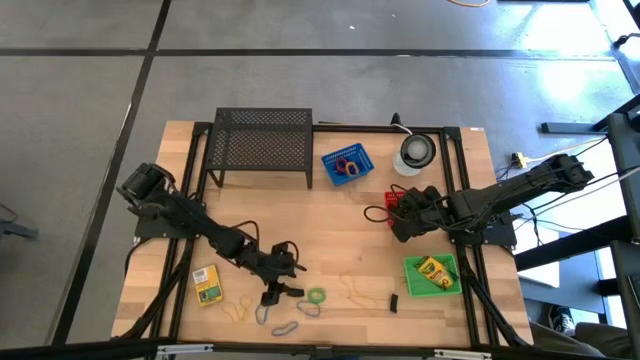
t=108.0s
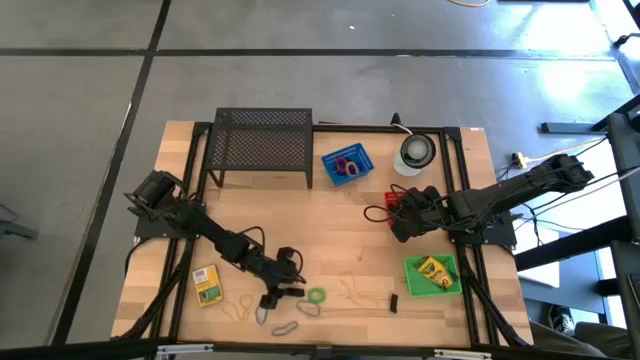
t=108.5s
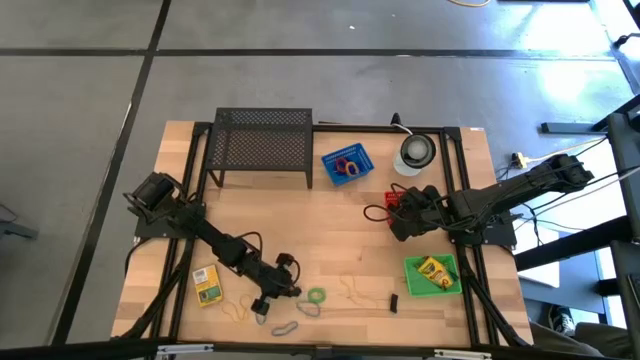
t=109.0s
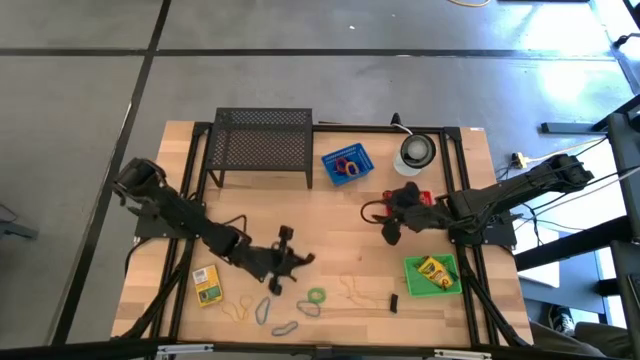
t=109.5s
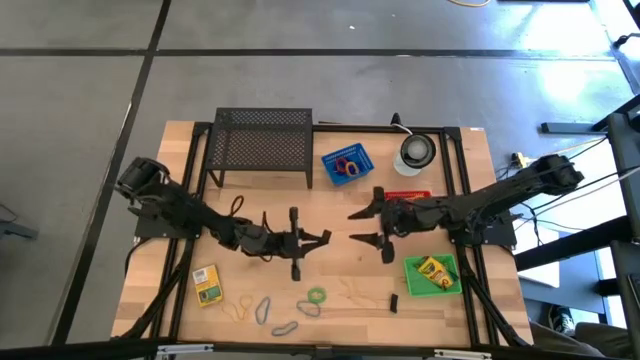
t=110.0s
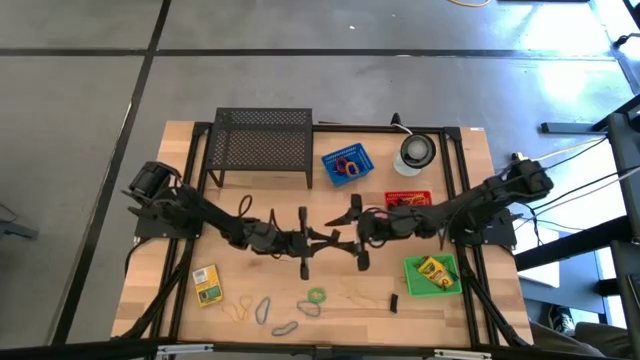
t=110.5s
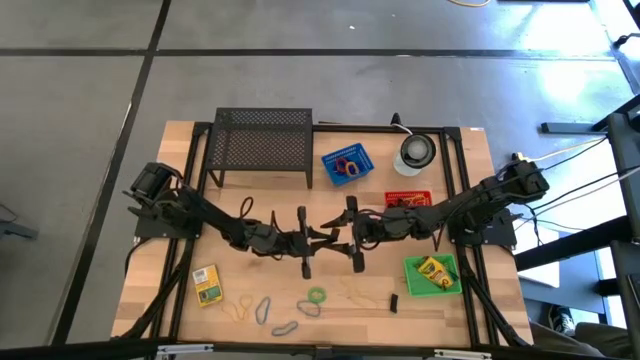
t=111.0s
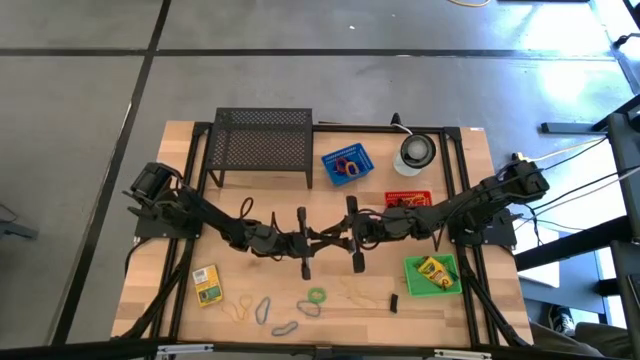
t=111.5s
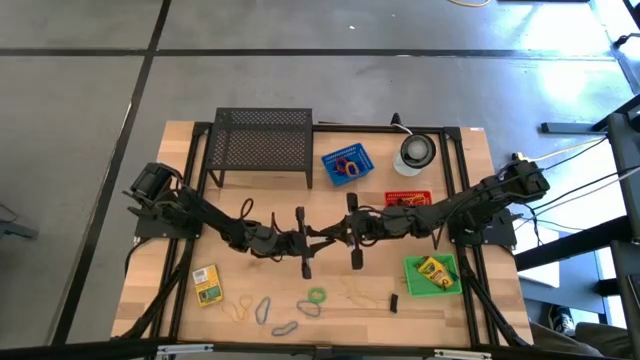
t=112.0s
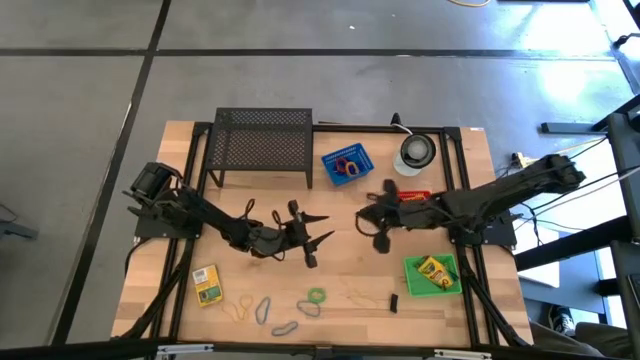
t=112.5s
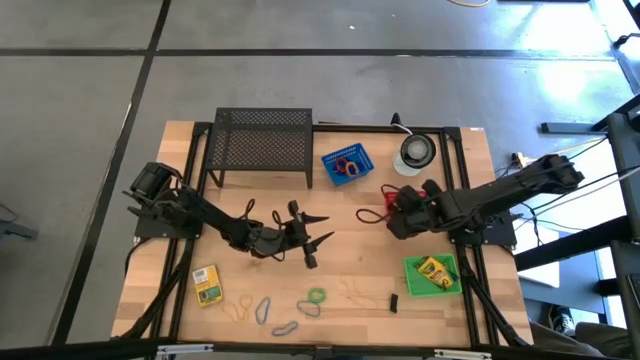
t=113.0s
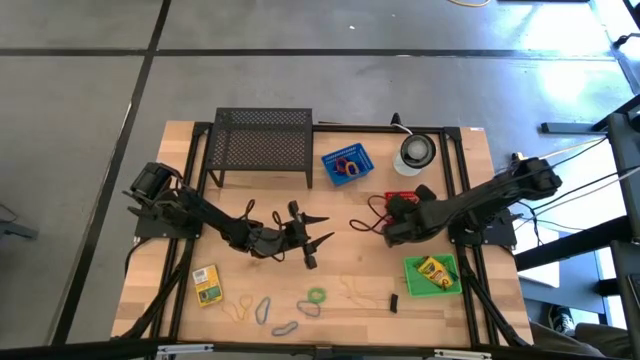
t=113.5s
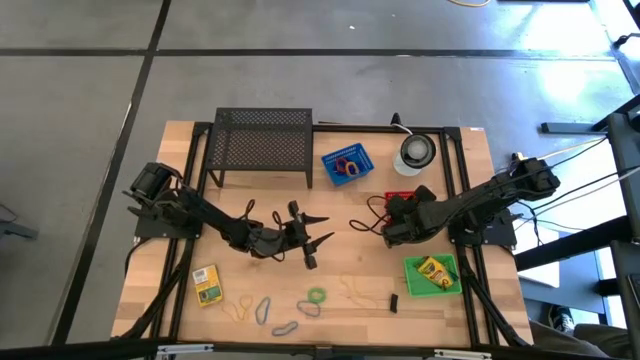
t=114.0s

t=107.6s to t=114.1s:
Task: Pick & Place Office Desk Supplies
Put the black arm band into the red bin

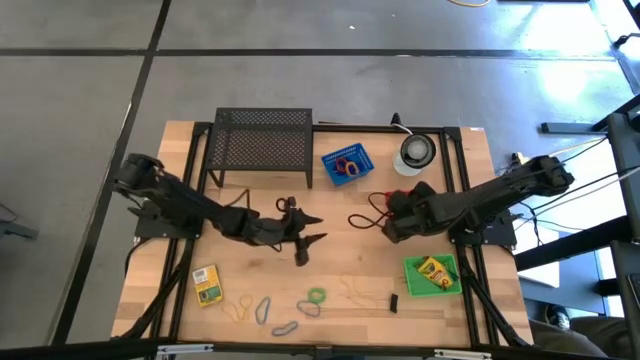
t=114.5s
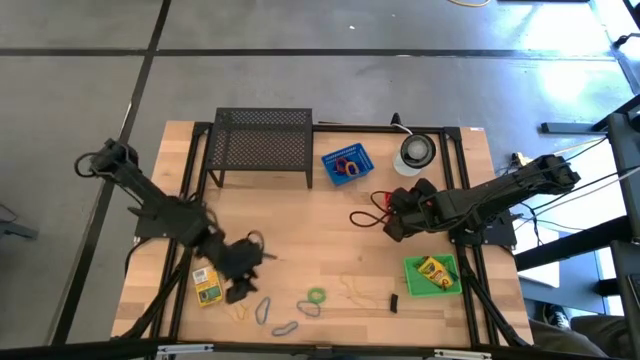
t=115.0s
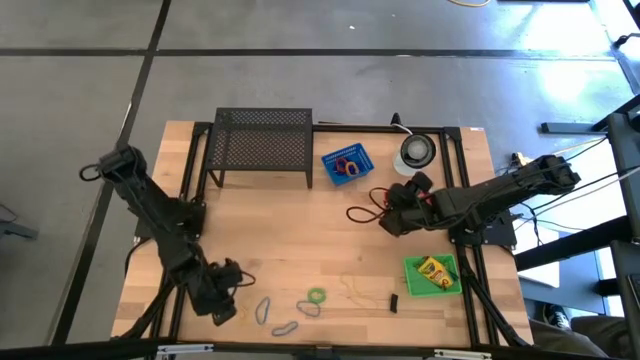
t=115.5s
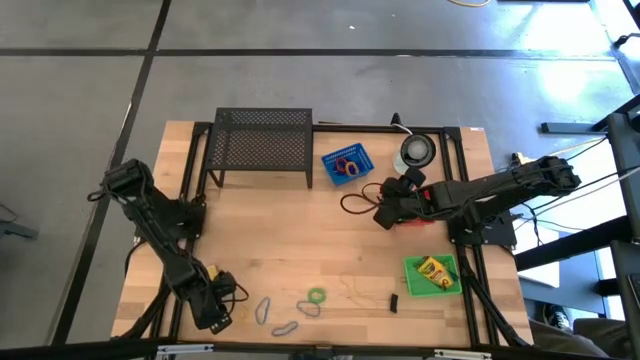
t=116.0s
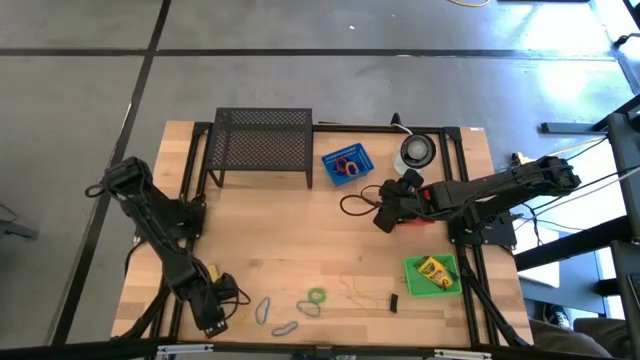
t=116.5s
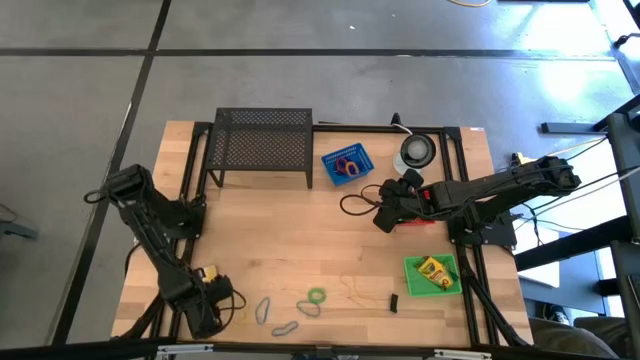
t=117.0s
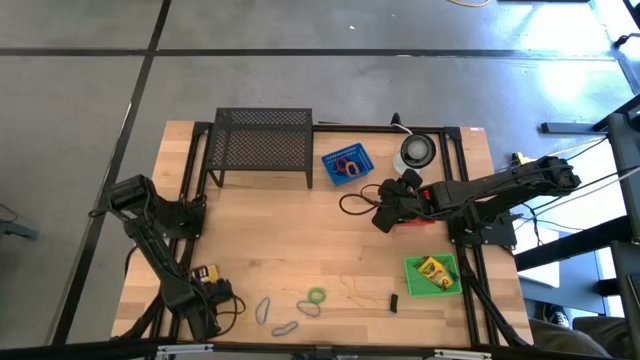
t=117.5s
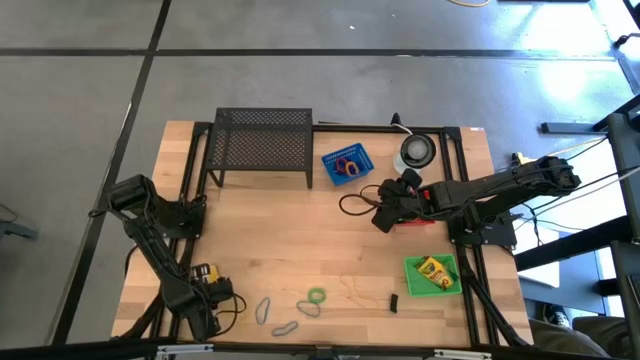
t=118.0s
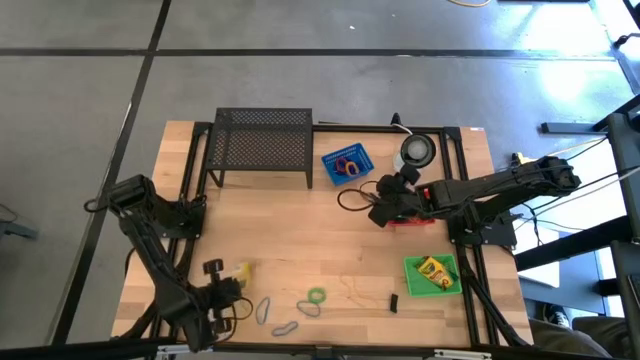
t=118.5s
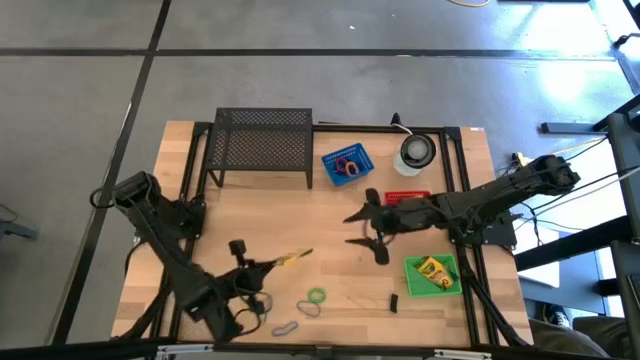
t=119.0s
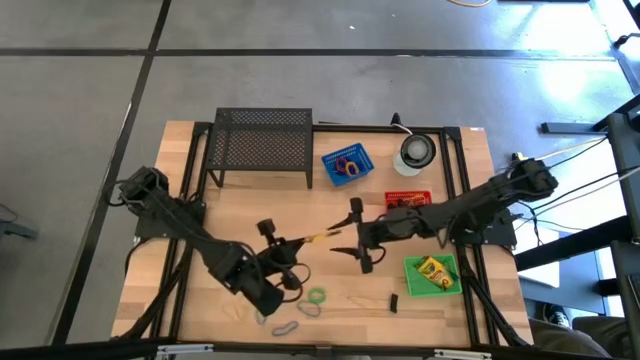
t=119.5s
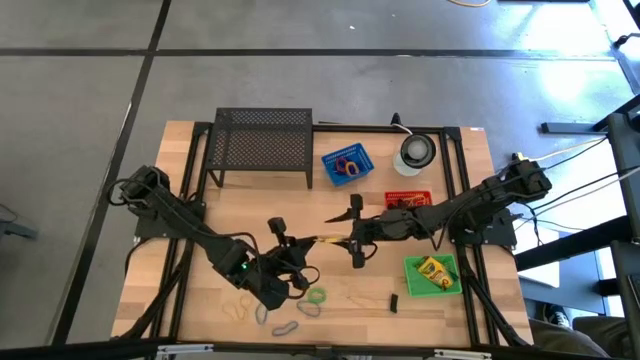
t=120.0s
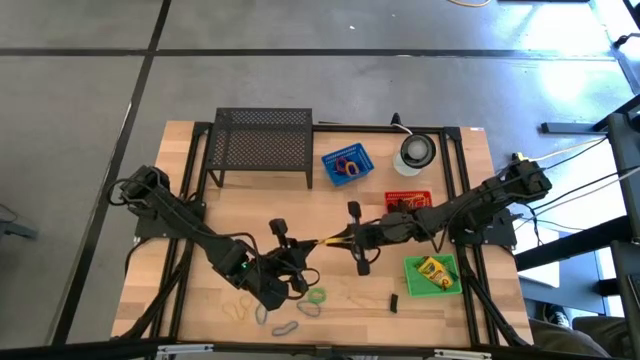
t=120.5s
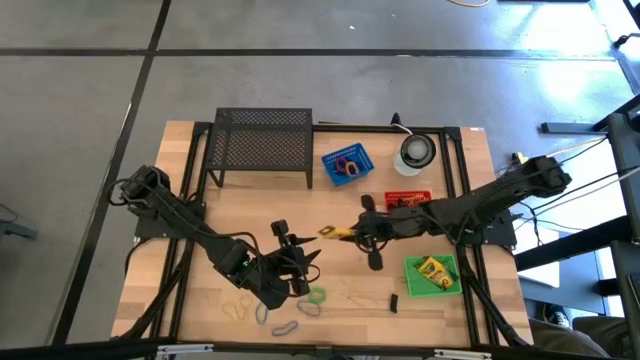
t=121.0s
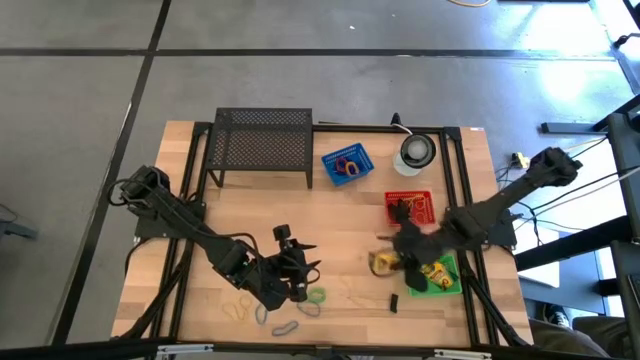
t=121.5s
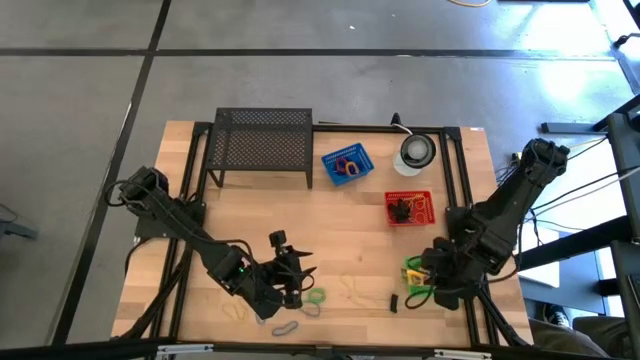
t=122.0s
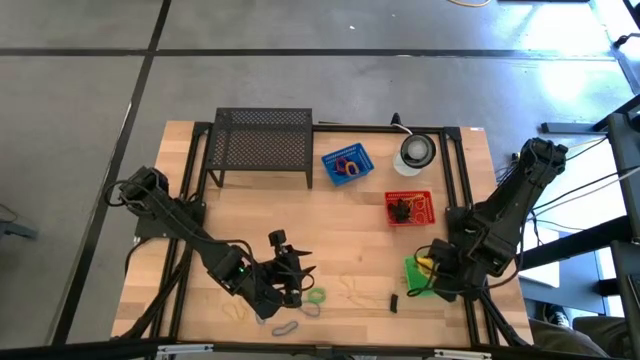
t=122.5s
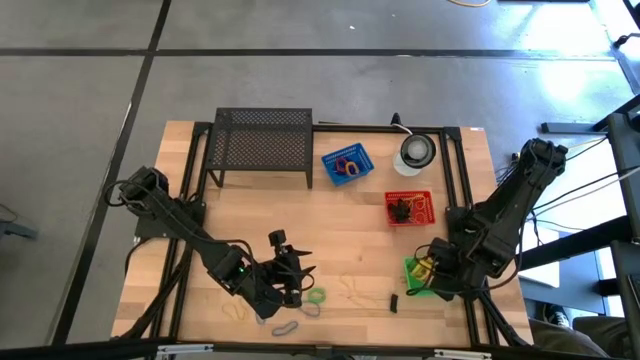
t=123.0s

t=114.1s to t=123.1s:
Put the crayon box into the green bin

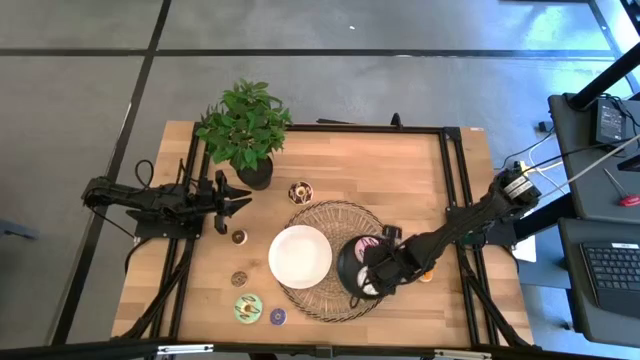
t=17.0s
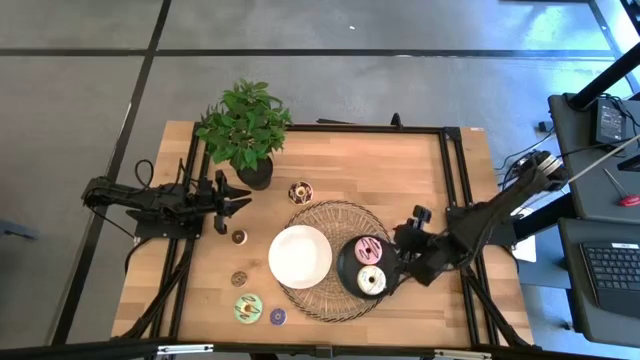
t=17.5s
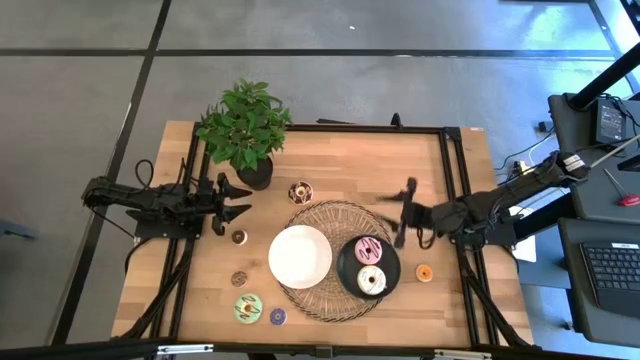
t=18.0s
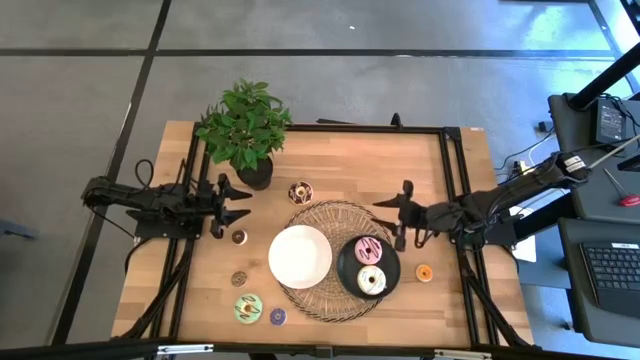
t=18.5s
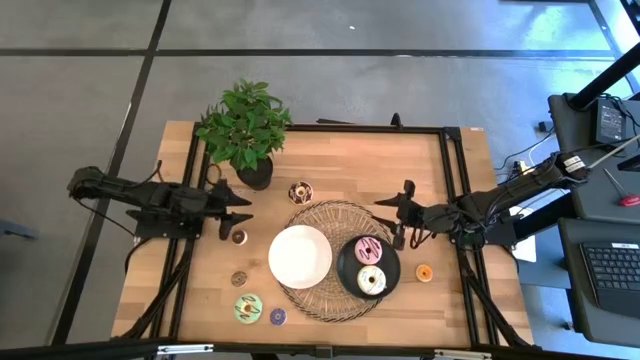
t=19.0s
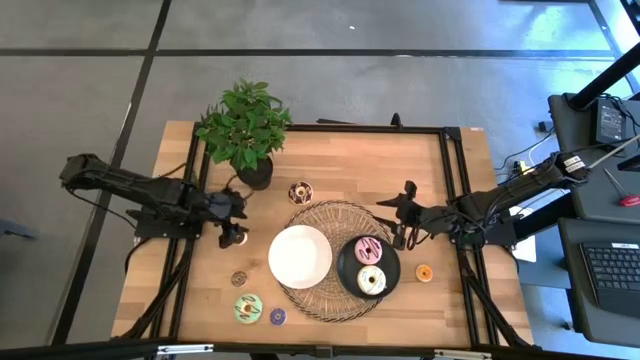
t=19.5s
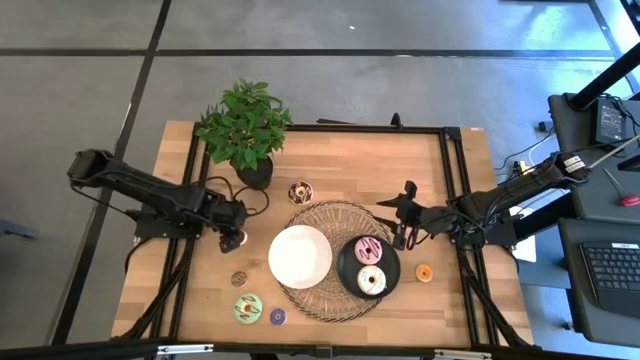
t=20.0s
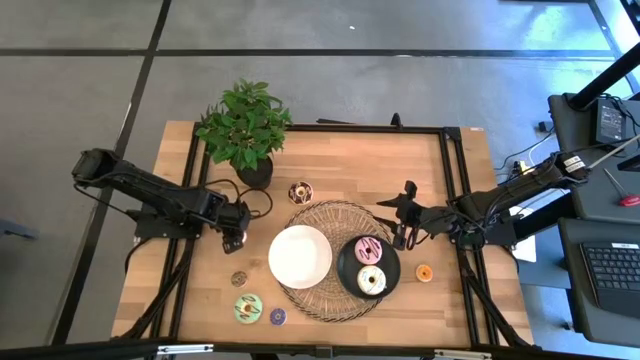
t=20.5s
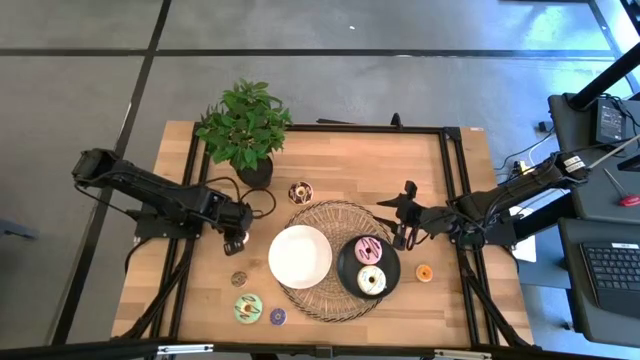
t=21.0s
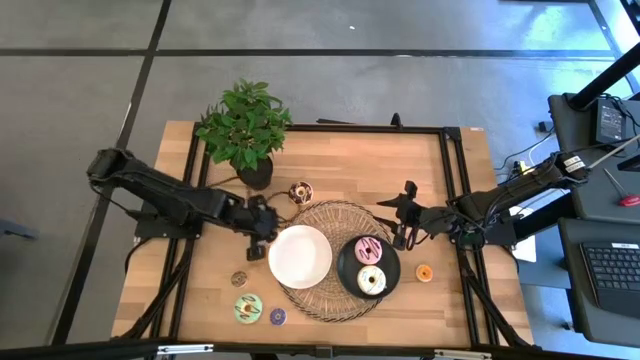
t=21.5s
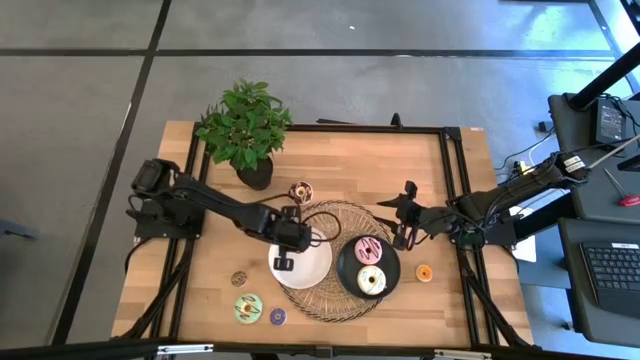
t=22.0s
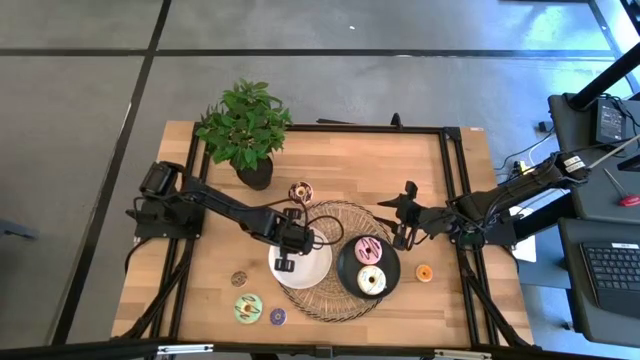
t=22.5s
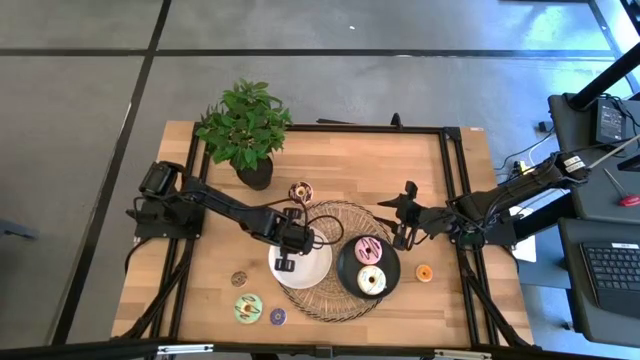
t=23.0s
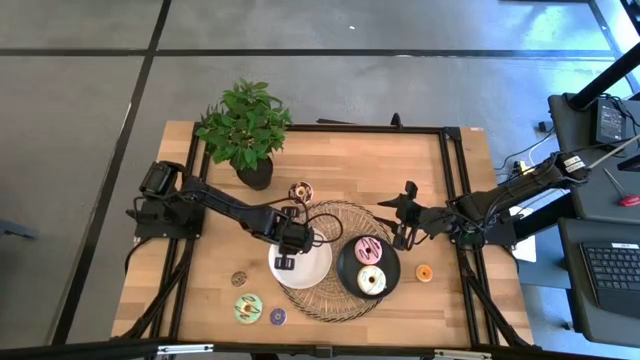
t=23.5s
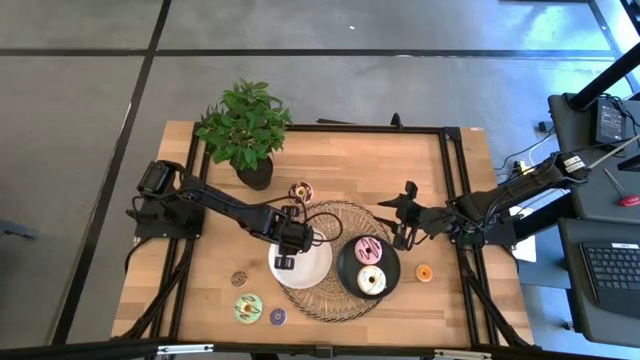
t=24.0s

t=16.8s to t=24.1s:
Task: Pick & Place donuts
Put the small black donut on the white plate
